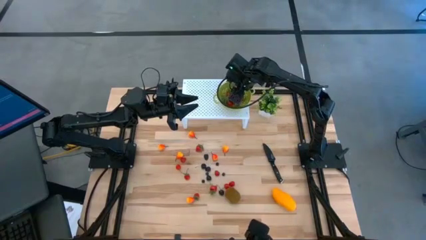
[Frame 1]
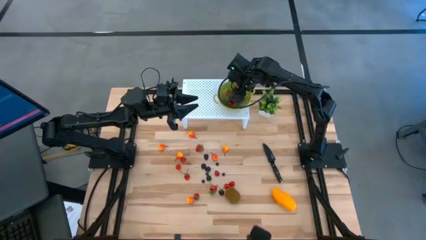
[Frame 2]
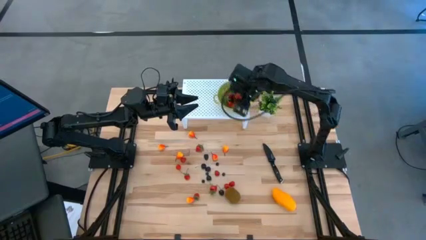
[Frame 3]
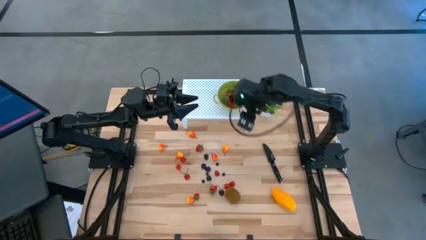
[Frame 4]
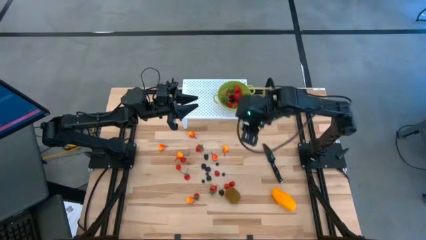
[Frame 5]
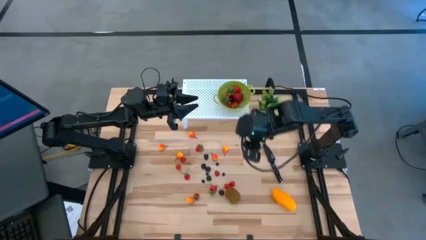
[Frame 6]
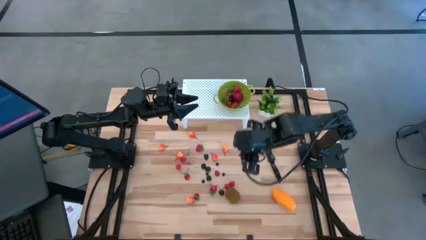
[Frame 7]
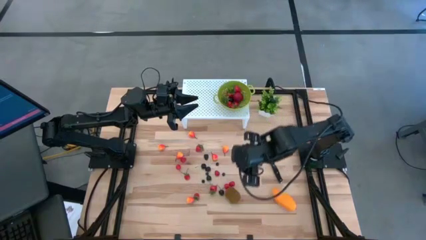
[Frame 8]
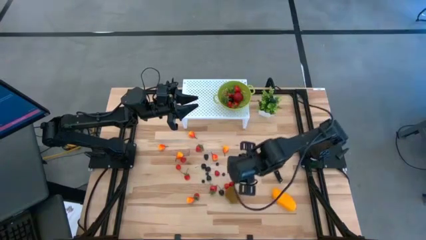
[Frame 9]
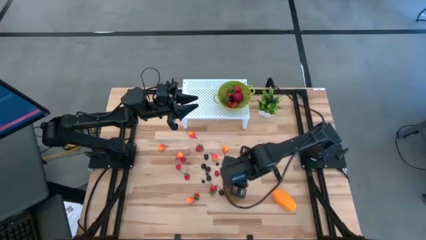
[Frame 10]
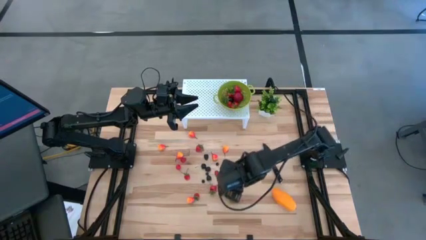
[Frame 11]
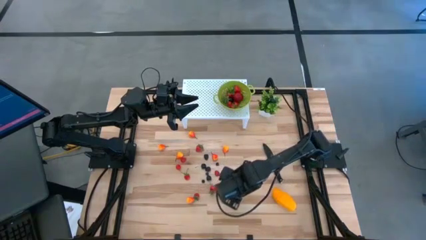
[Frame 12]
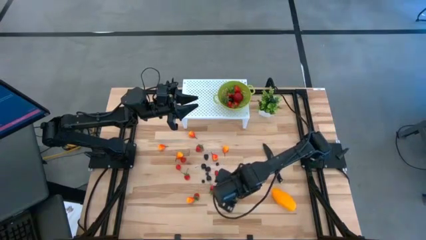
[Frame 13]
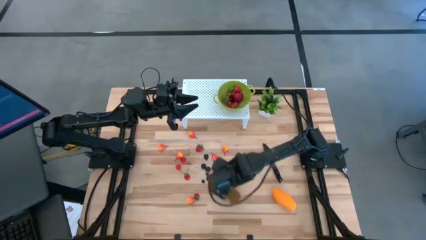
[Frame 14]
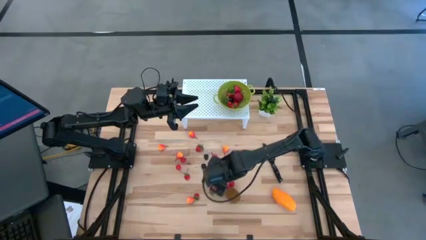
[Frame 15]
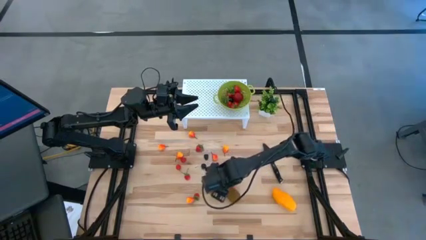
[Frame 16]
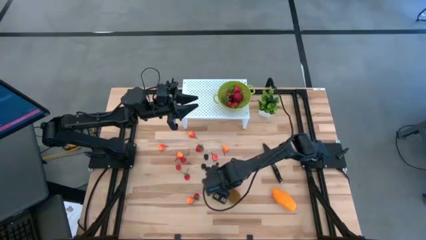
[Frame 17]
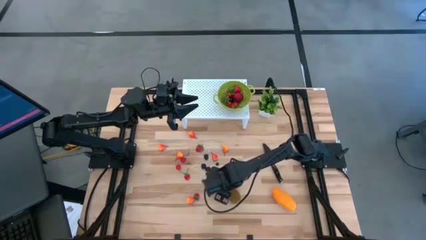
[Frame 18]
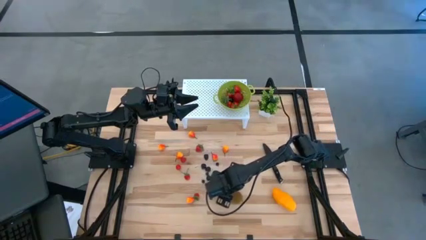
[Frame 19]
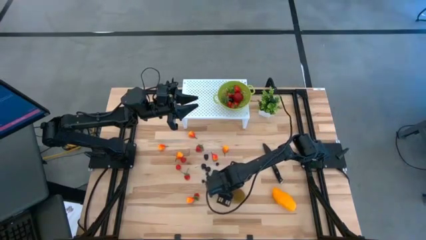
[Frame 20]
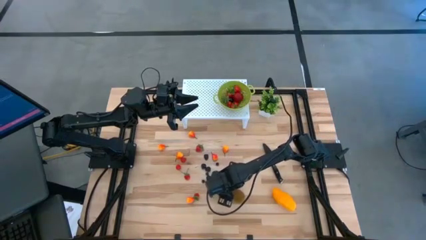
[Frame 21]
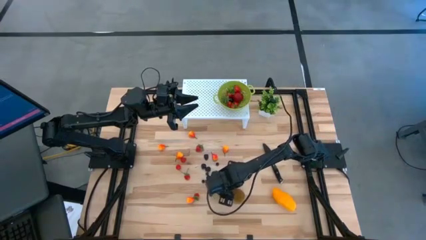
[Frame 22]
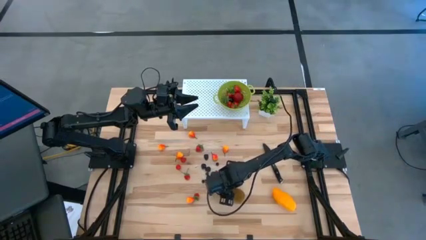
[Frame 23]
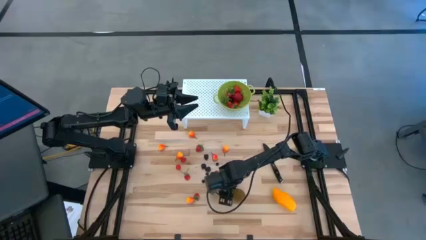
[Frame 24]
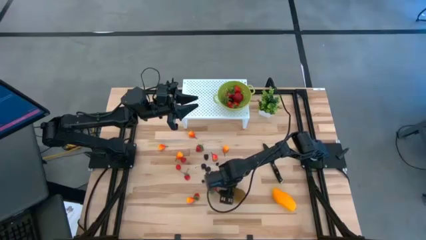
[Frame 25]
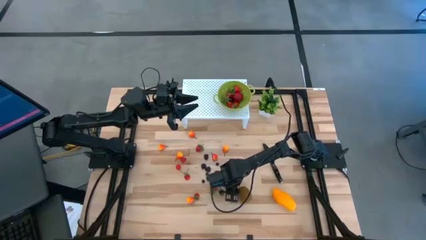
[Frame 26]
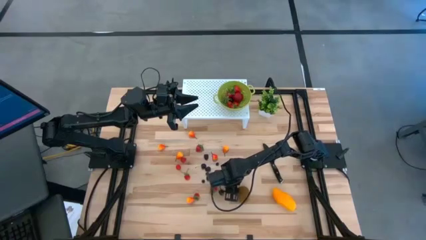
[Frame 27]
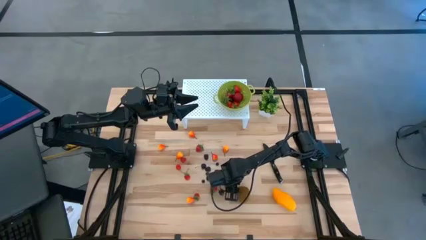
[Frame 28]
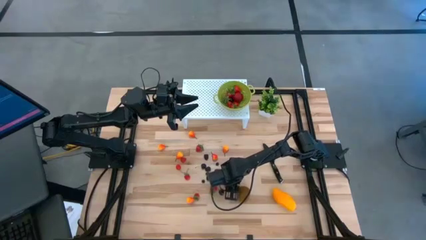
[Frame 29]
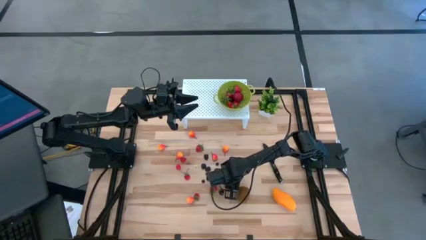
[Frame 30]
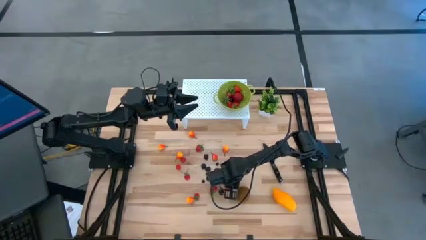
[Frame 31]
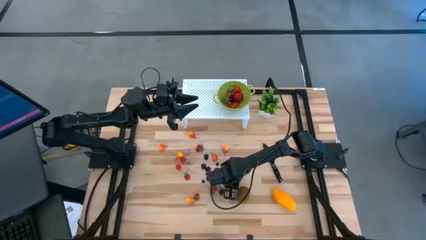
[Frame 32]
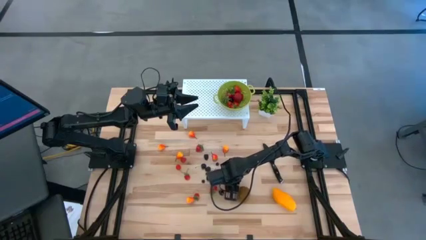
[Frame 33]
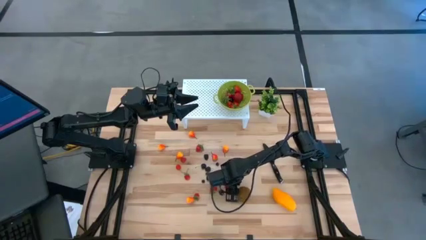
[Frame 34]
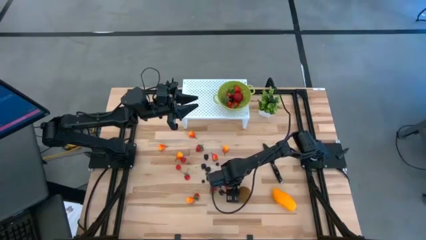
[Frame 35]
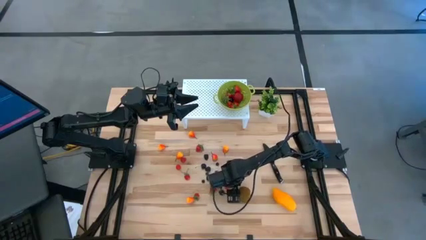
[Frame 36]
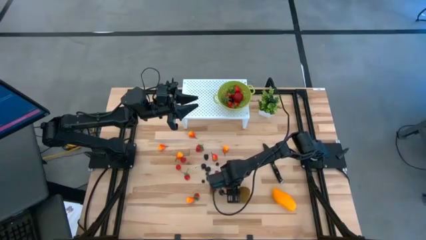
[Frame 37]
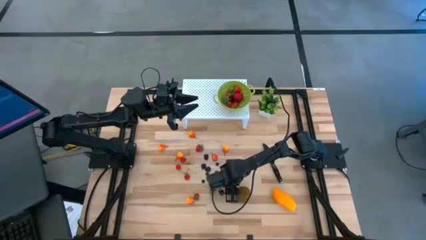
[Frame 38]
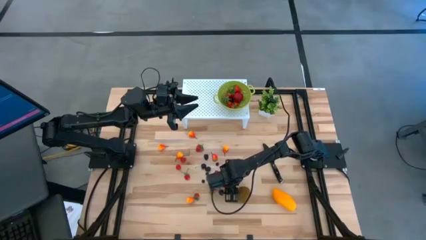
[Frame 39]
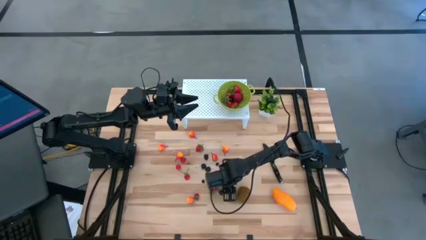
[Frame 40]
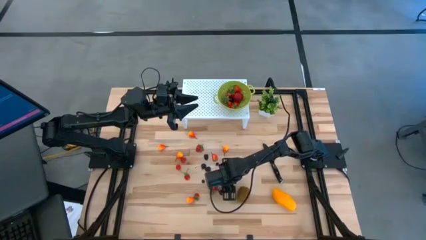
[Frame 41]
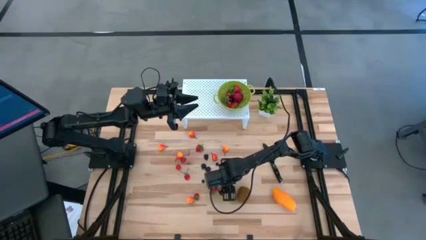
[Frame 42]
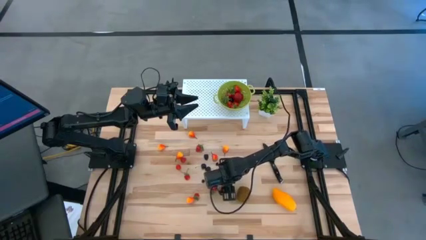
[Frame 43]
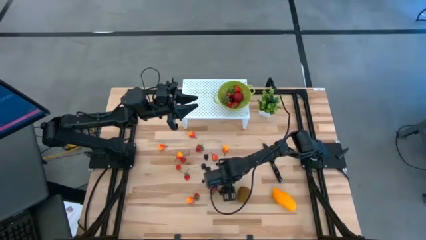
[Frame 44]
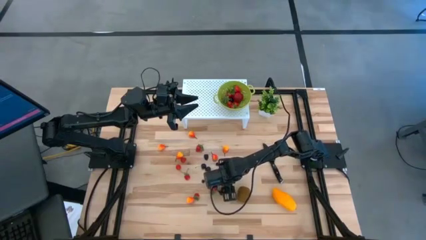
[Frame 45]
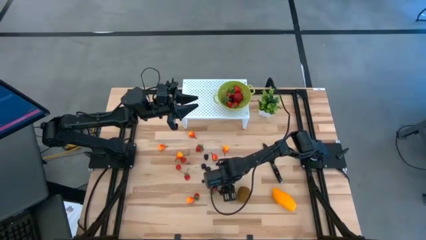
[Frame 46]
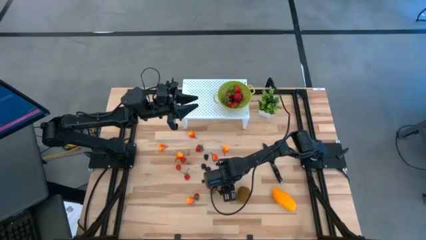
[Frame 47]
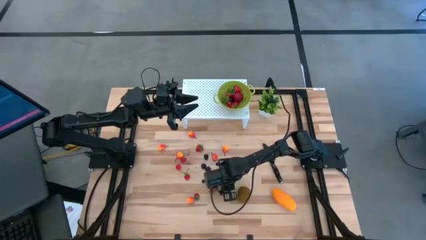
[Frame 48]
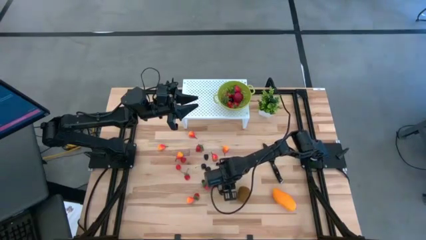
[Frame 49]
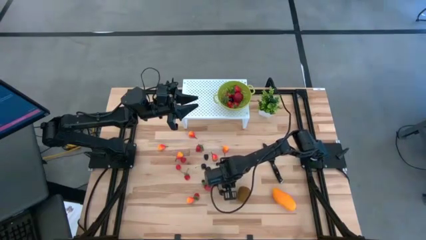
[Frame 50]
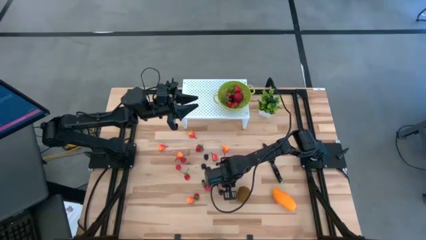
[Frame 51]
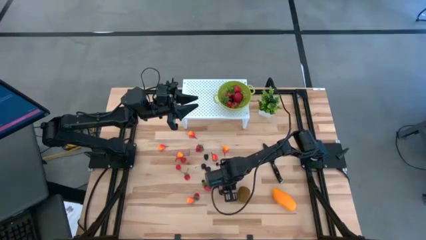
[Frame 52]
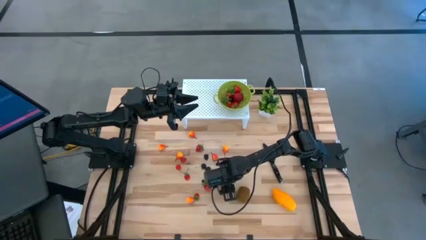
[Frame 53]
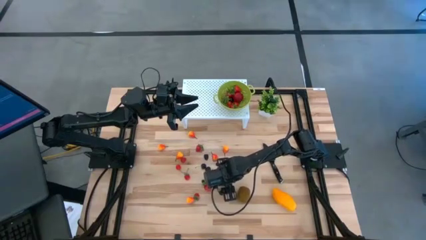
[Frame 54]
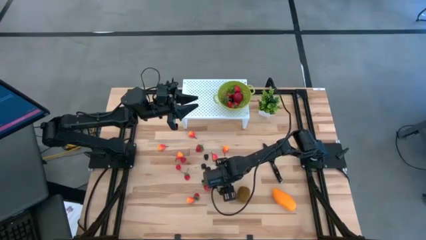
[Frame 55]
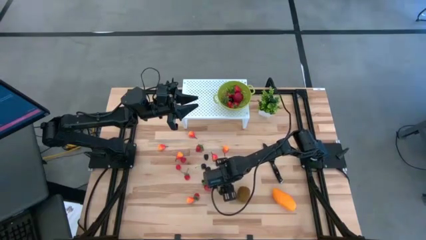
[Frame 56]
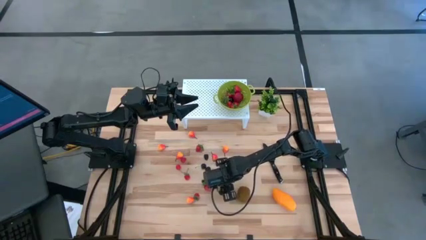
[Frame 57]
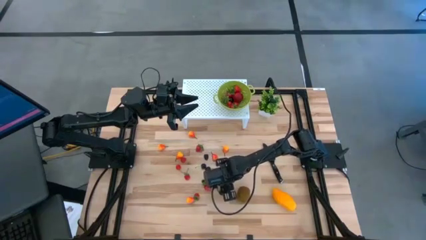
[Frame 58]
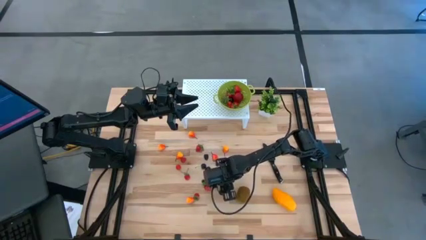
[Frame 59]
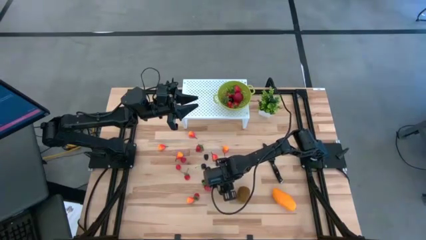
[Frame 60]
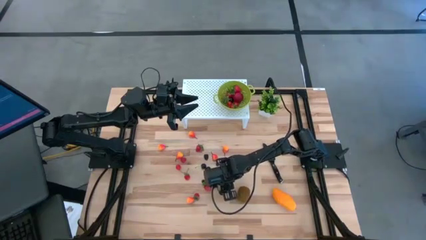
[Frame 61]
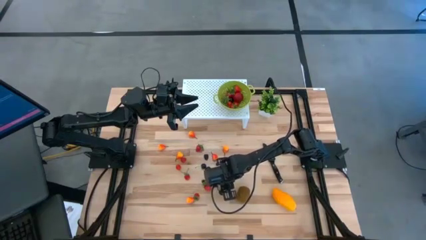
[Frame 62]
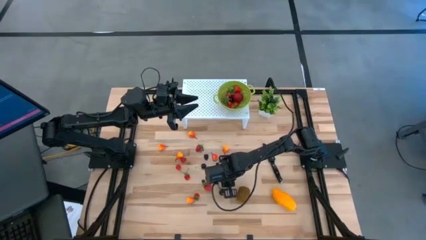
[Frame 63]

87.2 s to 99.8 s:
Task: Pick & Place Fruit
Put the red cherry into the green strainer bowl

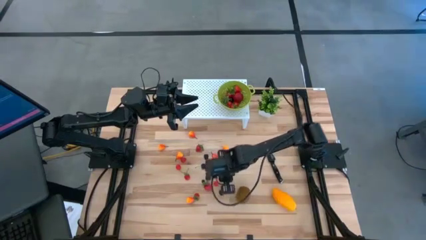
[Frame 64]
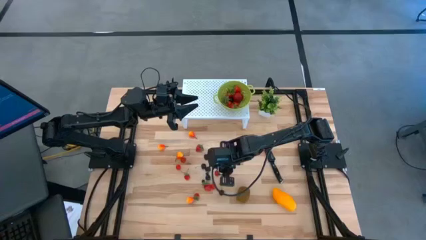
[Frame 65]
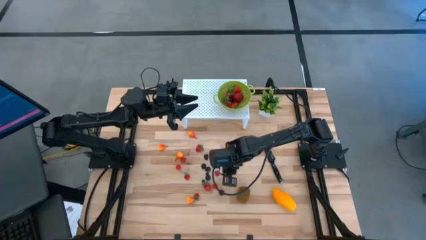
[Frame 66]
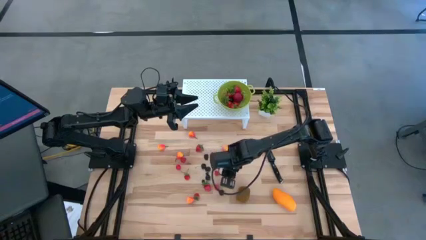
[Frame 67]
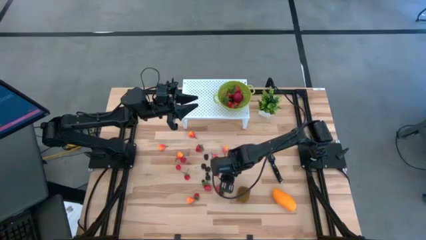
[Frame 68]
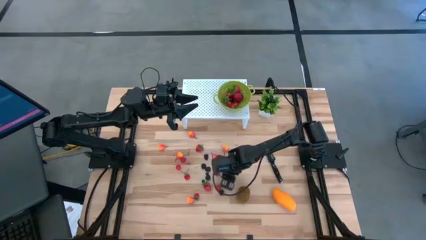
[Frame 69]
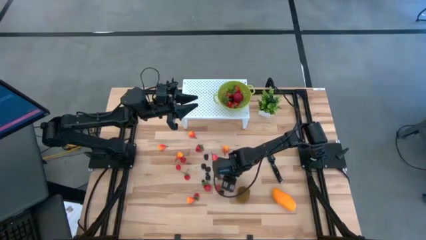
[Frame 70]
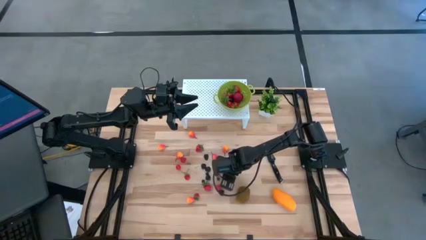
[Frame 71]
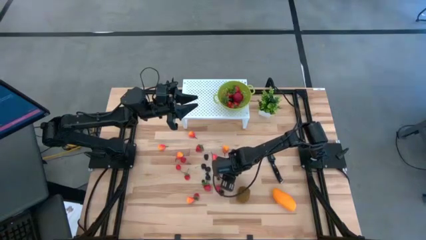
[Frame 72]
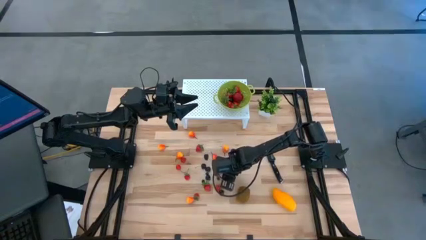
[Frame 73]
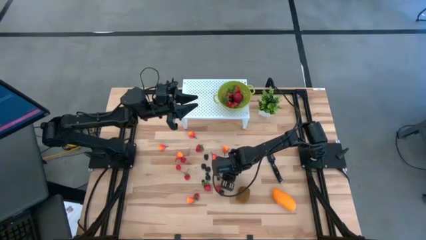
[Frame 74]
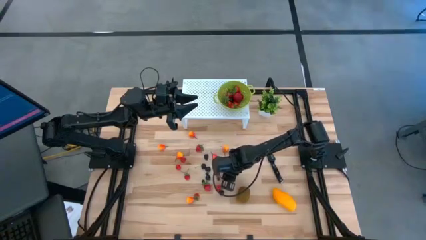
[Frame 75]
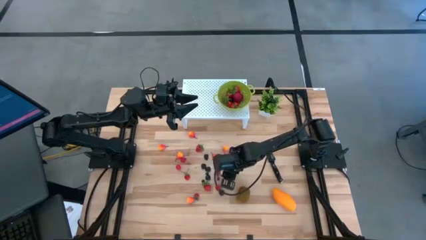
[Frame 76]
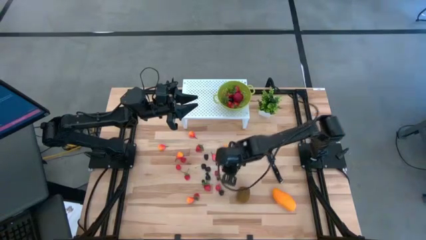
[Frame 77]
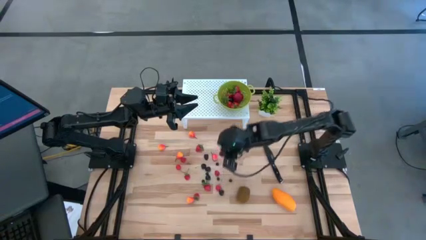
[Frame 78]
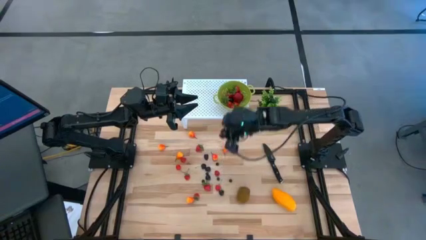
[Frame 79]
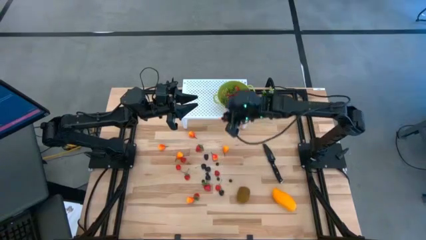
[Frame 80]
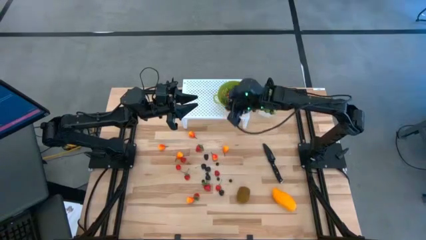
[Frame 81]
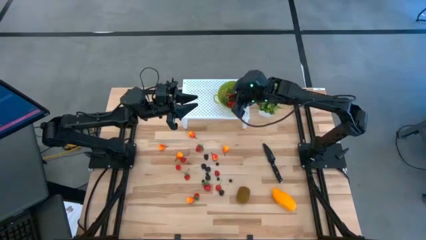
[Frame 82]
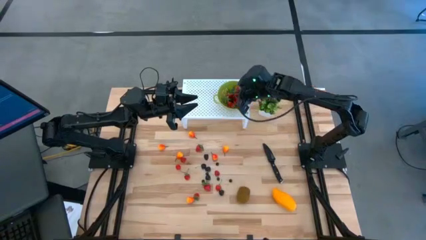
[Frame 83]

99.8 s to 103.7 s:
Put the red raspberry into the green strainer bowl
